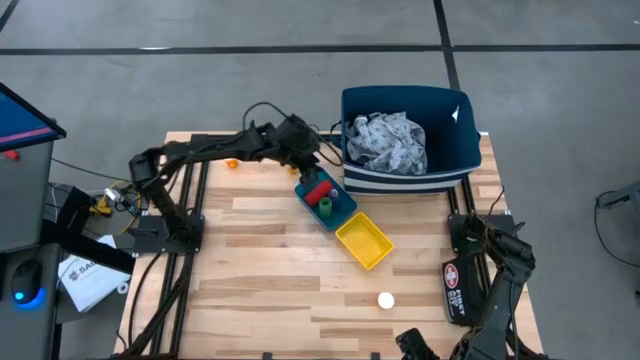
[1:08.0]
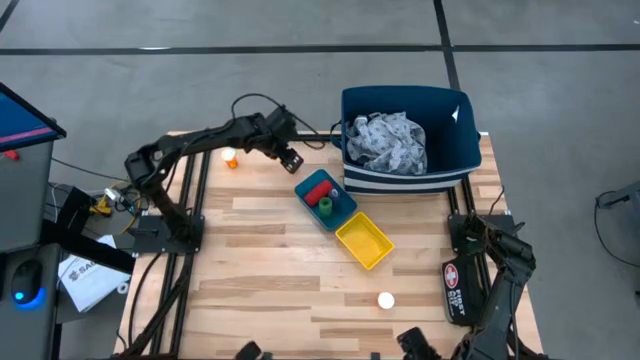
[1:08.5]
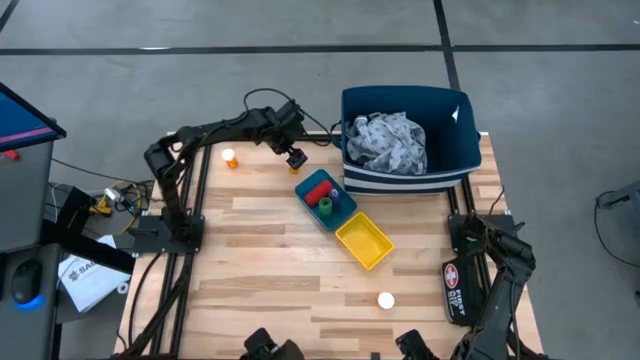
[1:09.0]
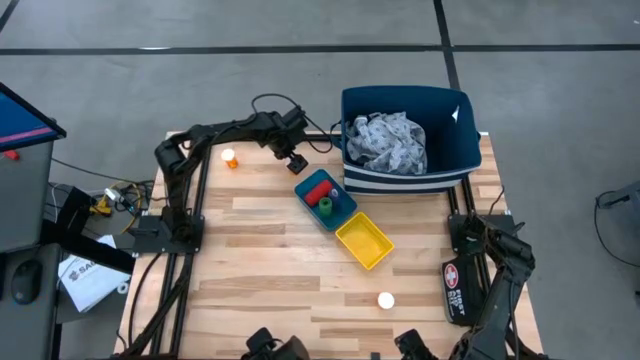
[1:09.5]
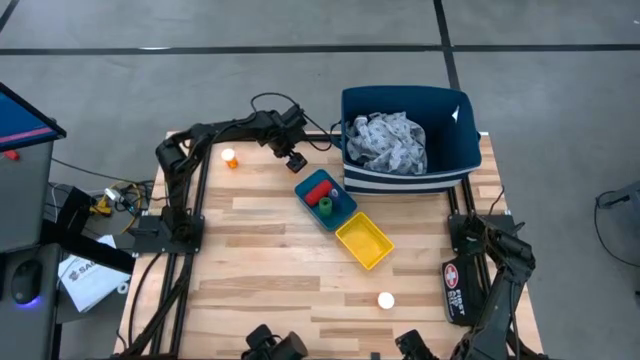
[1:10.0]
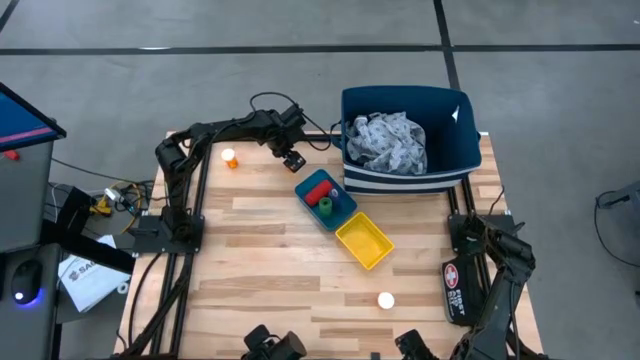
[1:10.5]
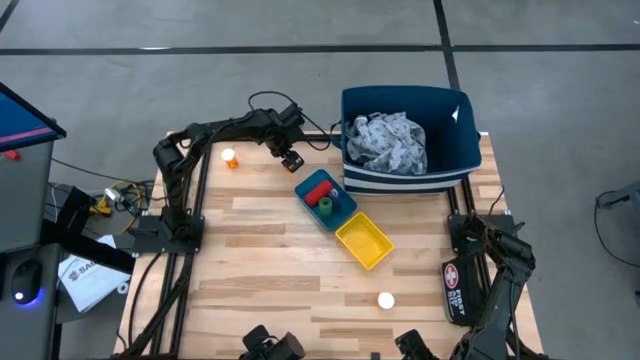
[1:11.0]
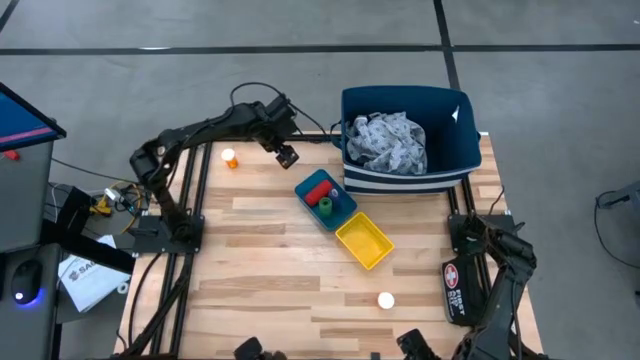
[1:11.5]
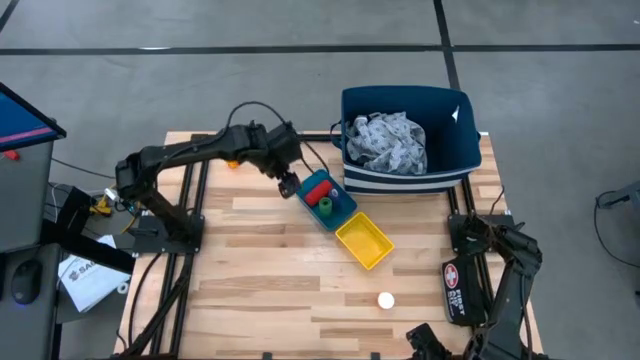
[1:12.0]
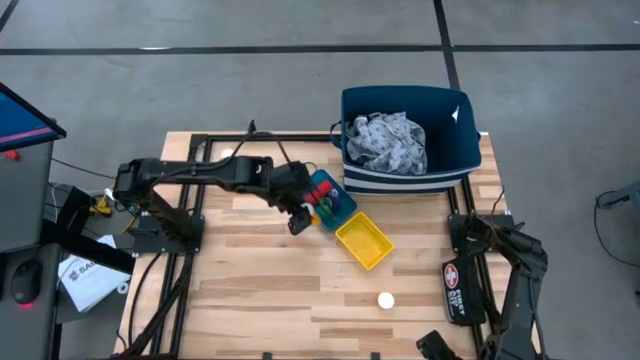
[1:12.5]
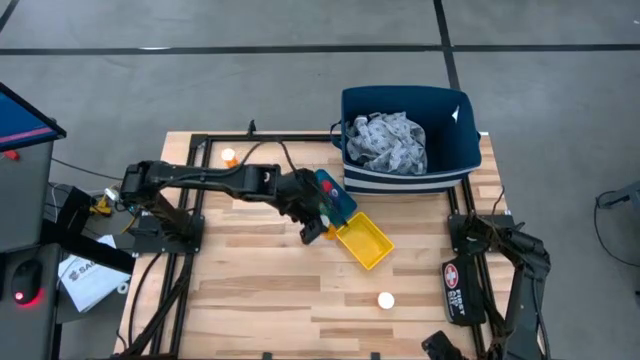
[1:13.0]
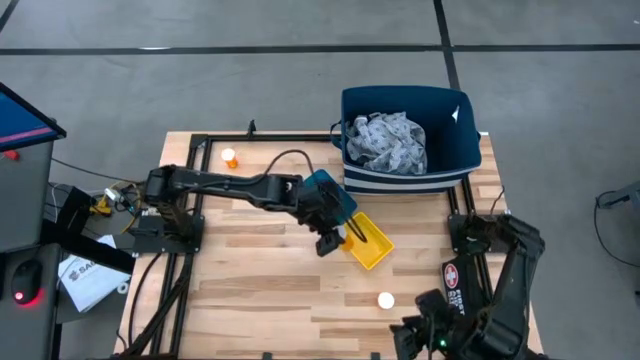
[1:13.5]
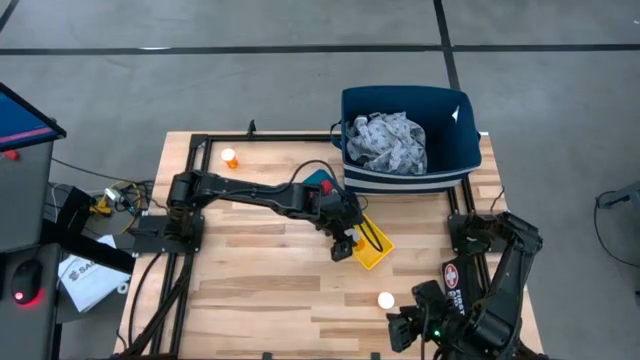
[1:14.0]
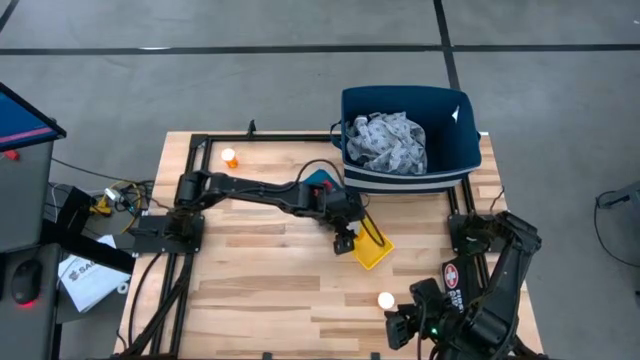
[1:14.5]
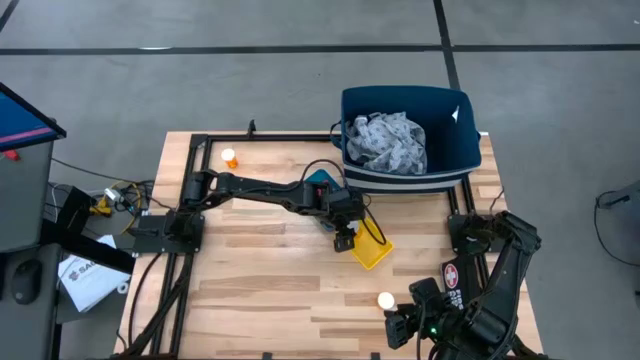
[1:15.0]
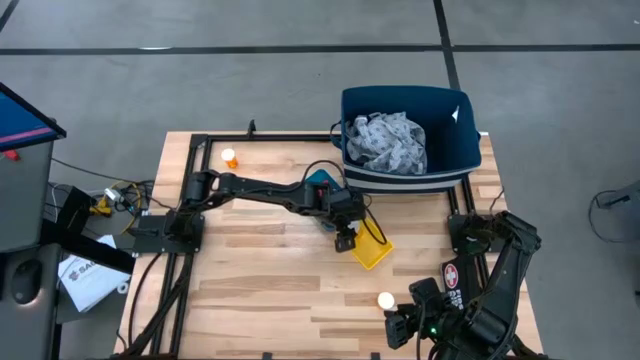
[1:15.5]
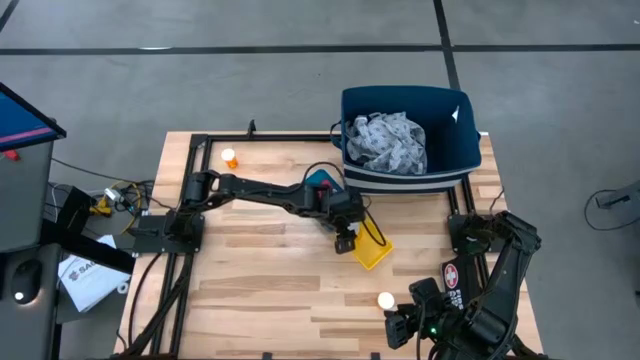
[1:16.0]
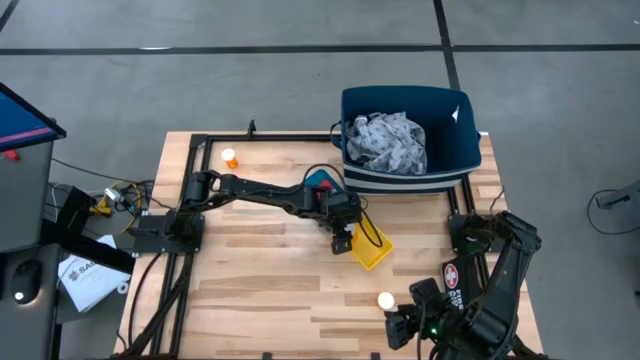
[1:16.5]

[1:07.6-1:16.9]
Task: Pick & Place Medicine items
Put the top right orange pill bottle into the yellow bin

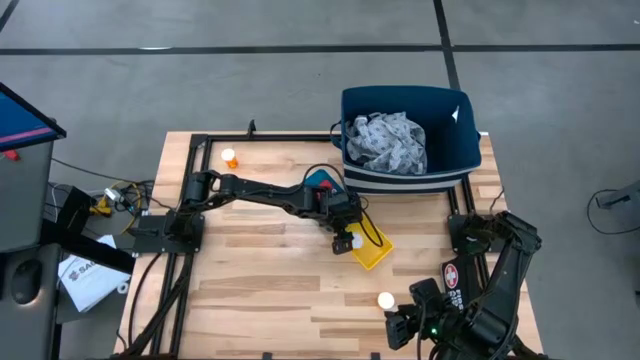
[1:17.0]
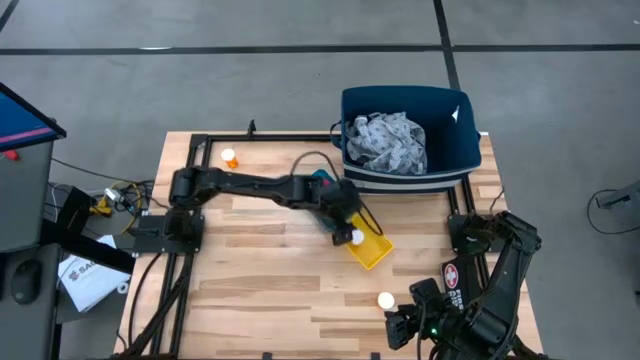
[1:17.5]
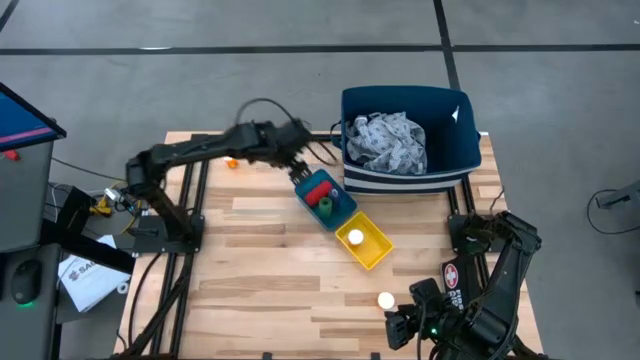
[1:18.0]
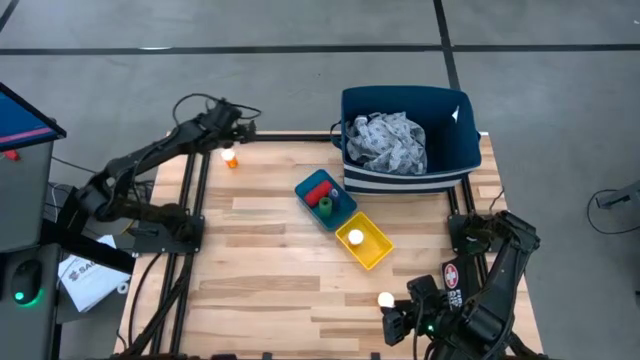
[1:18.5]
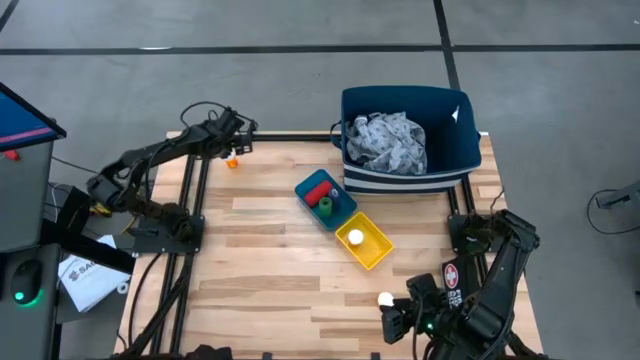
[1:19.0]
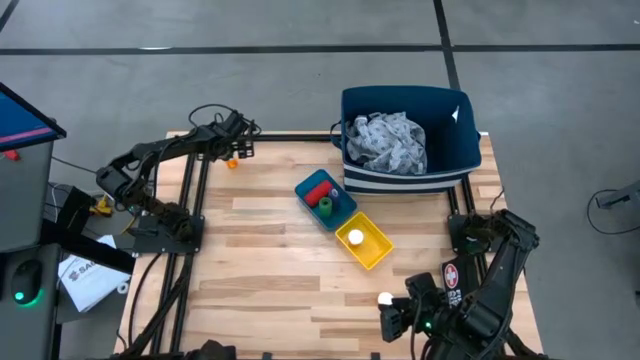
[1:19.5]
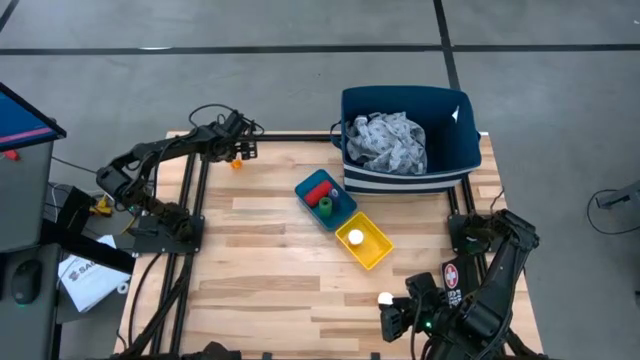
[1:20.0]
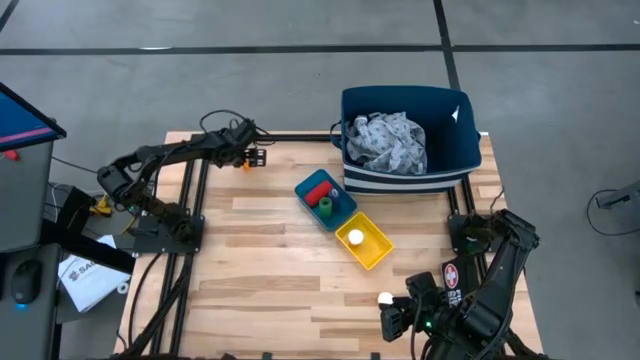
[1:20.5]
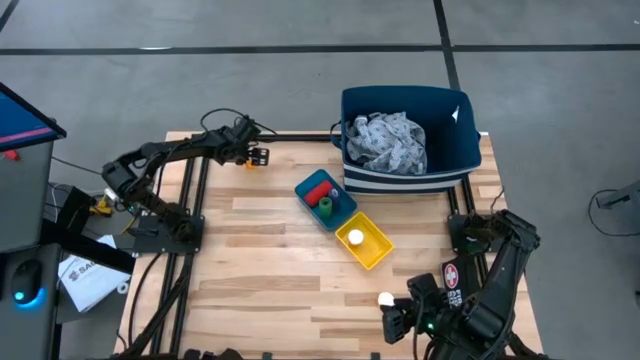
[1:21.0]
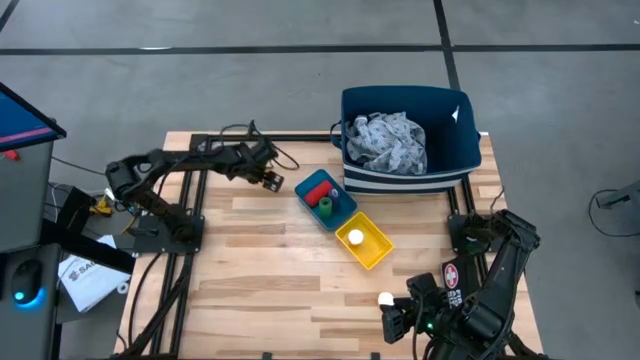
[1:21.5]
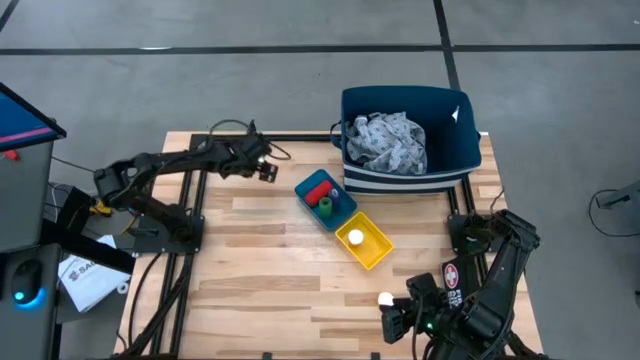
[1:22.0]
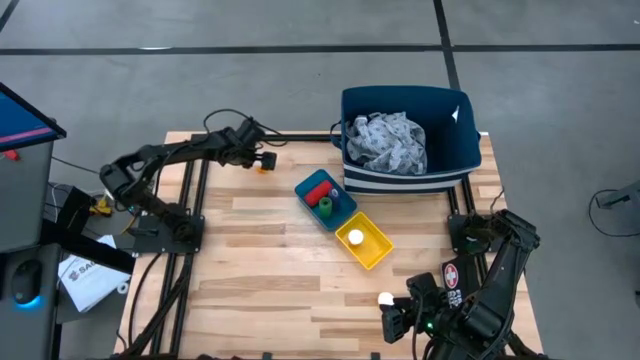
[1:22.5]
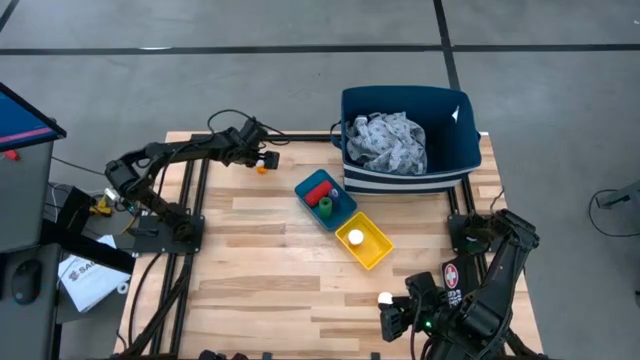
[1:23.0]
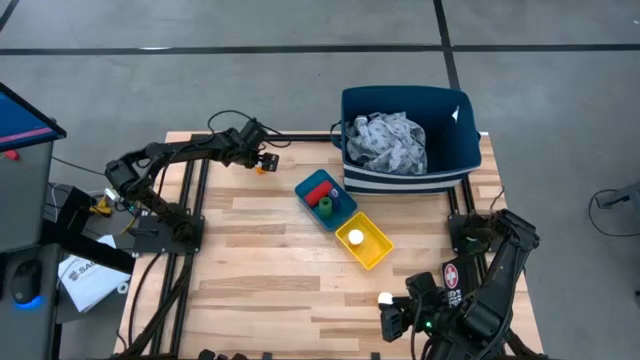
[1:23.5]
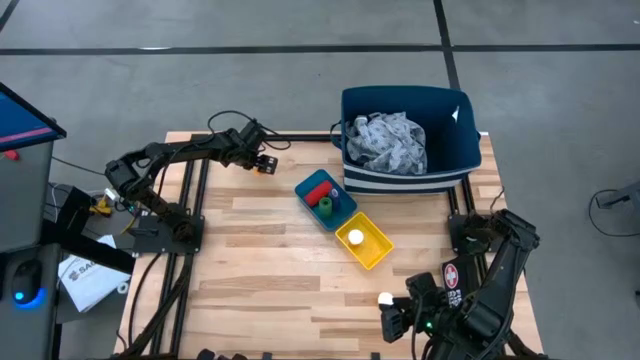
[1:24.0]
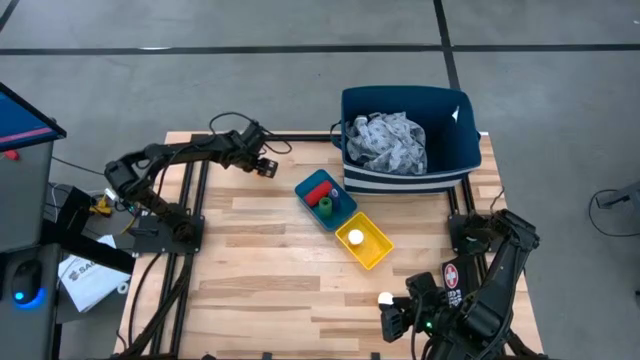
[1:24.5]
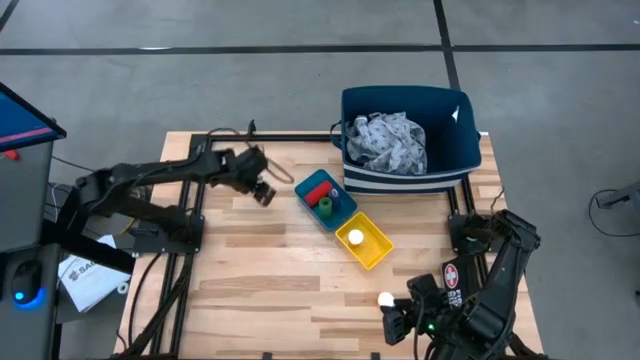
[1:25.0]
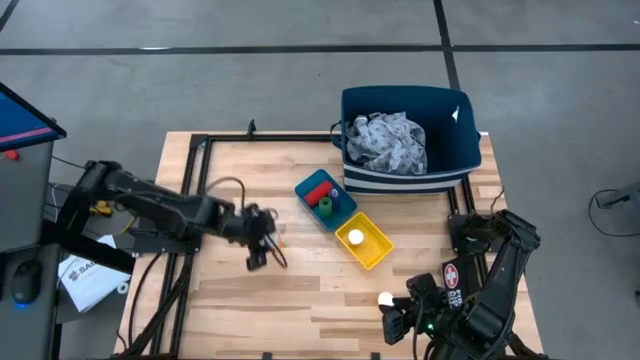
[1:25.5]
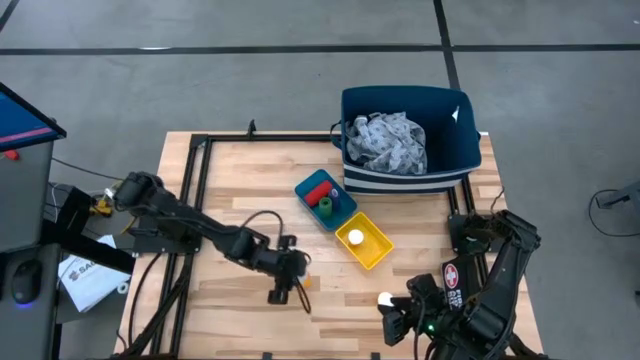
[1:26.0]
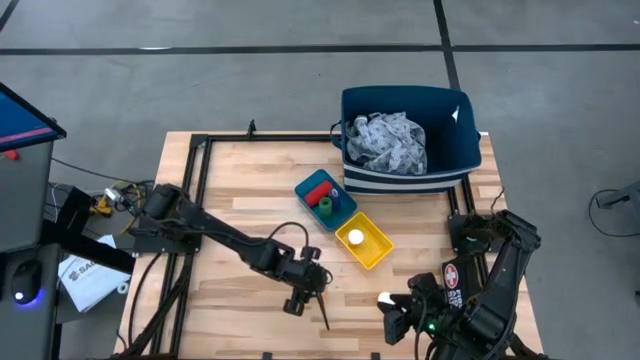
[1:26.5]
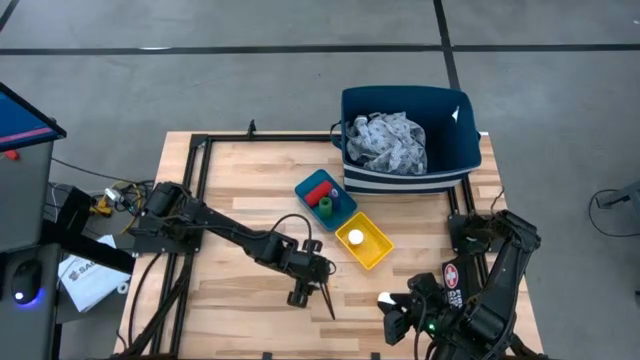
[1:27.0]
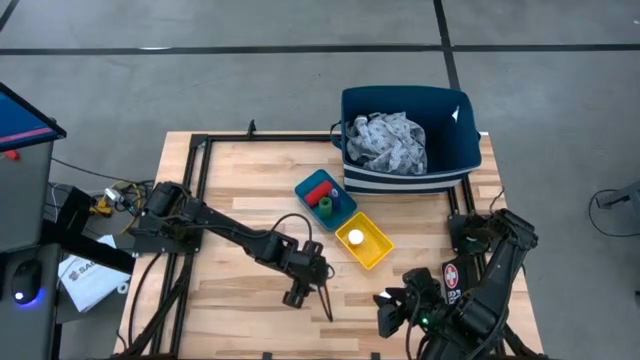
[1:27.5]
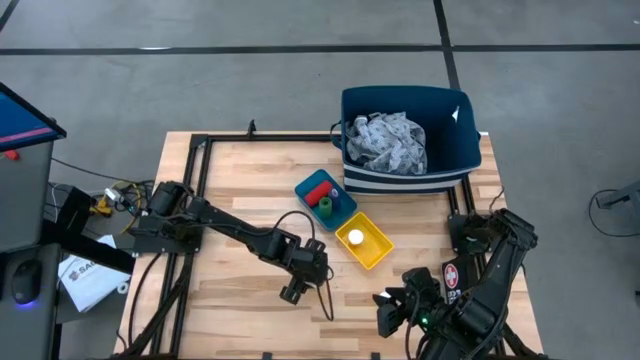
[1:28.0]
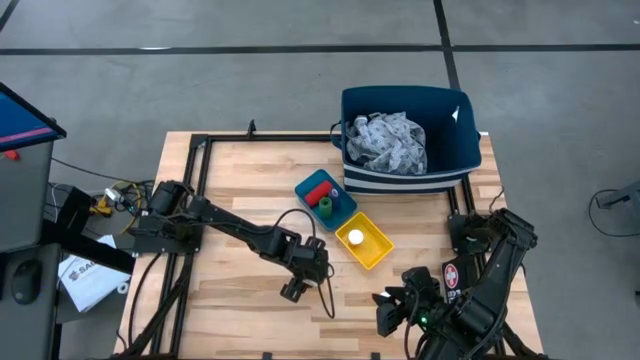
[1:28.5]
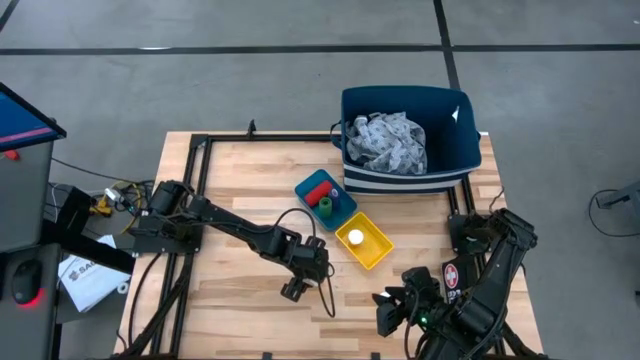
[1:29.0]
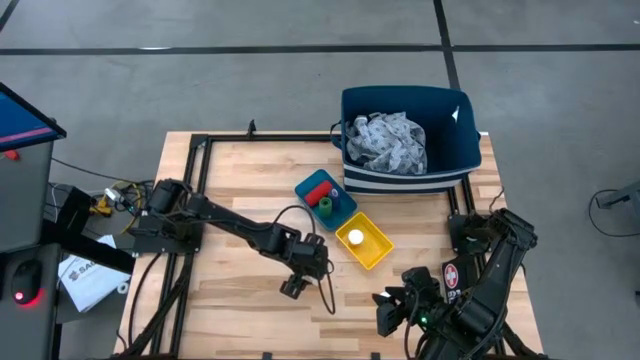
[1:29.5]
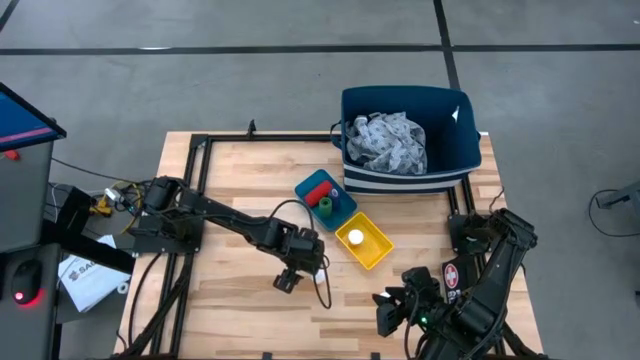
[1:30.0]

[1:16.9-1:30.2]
Put the top orange pill bottle into the yellow bin
